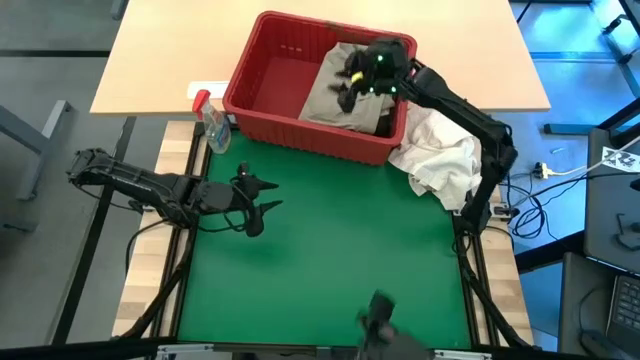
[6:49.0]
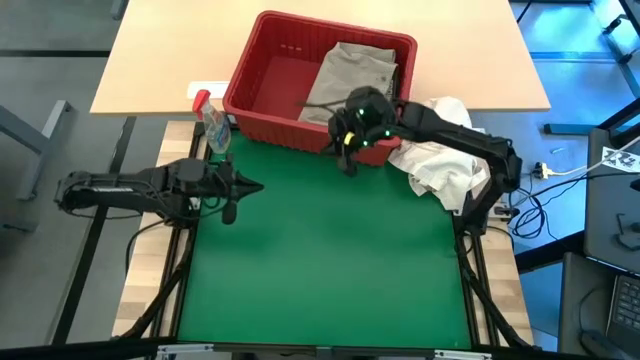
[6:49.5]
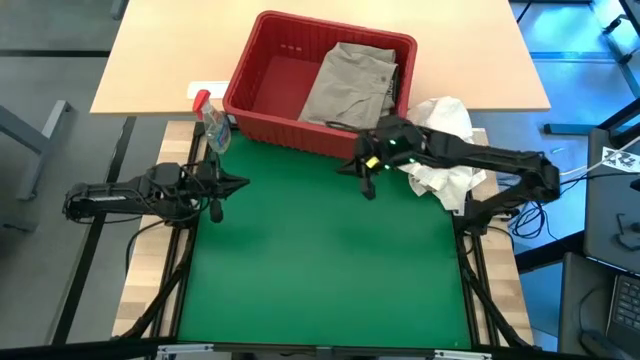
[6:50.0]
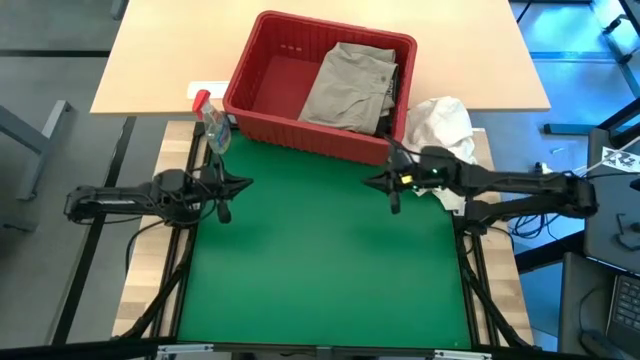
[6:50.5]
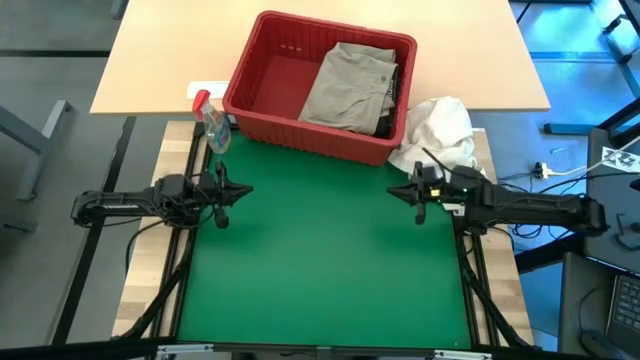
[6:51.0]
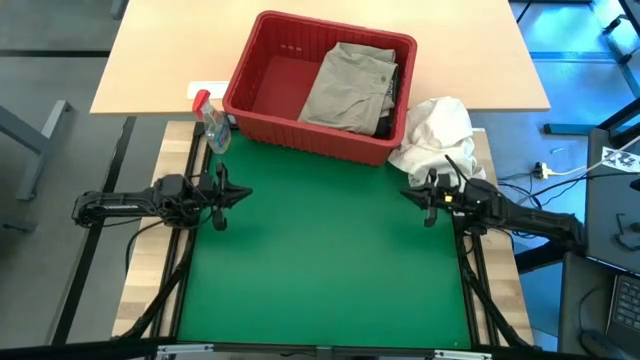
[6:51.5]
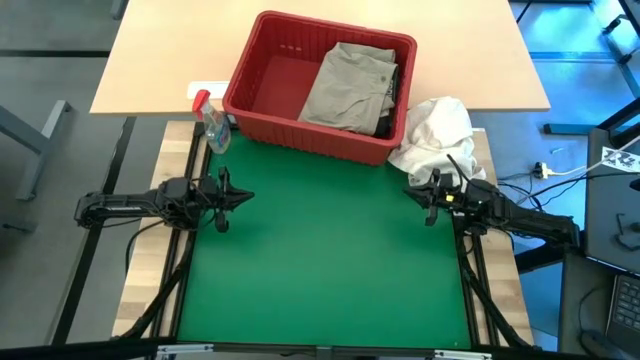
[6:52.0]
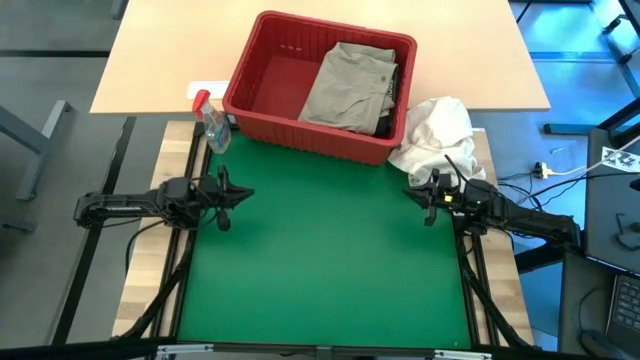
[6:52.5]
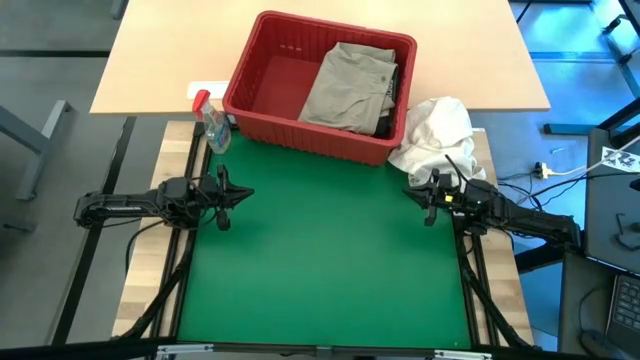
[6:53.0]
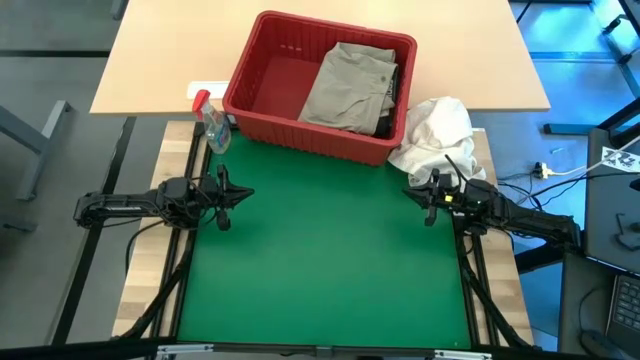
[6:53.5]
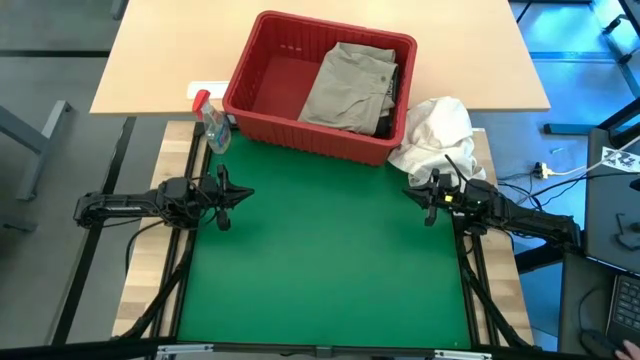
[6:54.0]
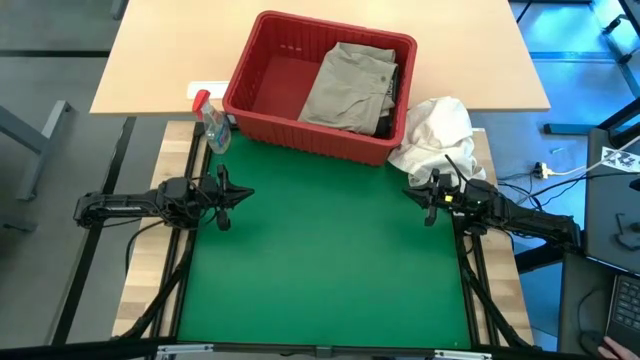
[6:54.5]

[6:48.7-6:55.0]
Task: Fold Laundry from Bin
Return to Home Position

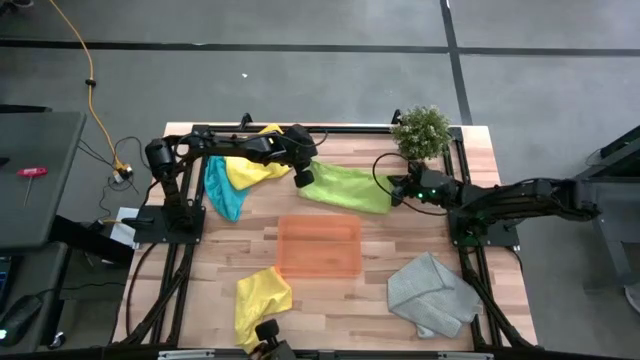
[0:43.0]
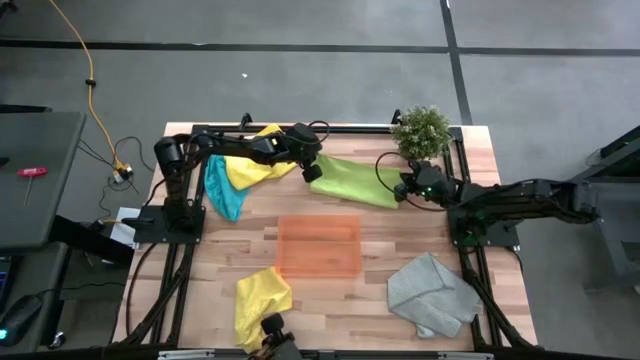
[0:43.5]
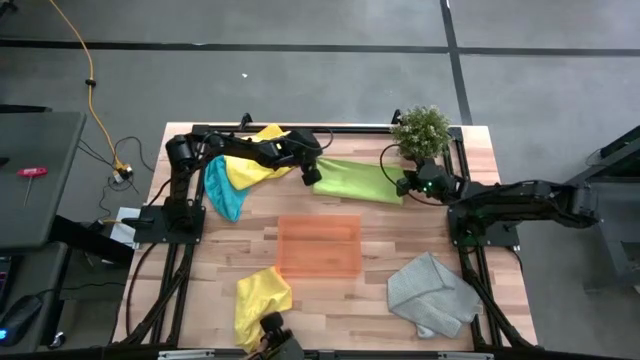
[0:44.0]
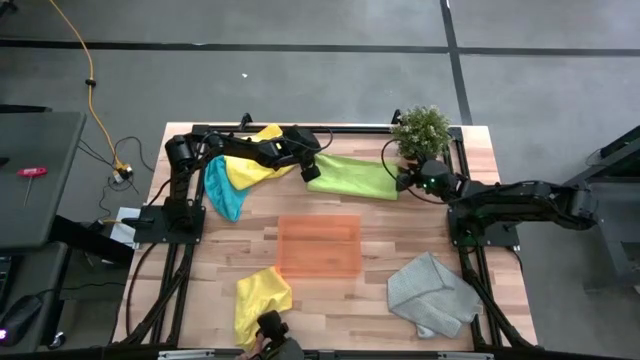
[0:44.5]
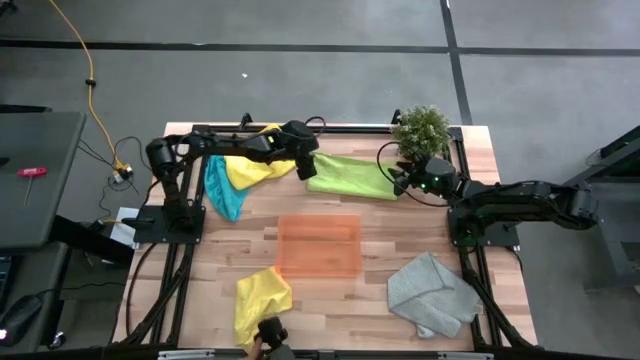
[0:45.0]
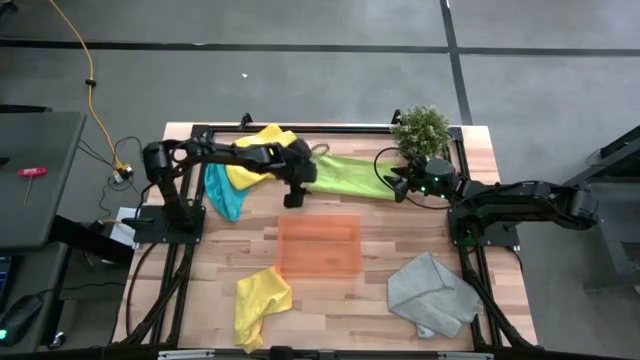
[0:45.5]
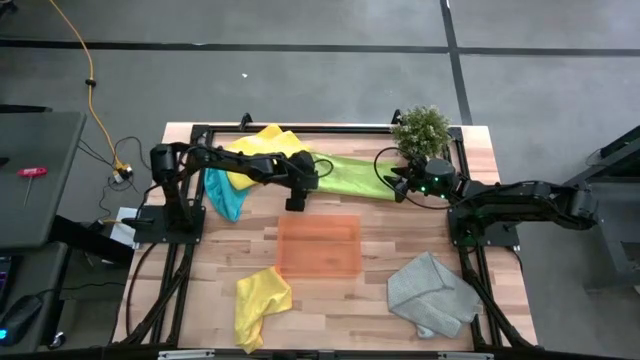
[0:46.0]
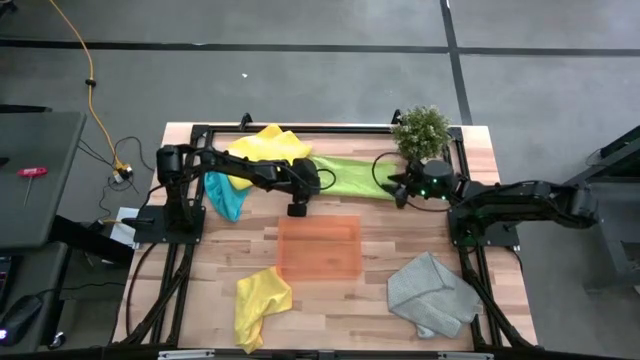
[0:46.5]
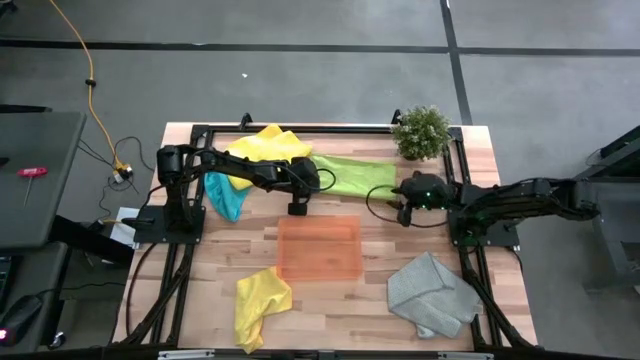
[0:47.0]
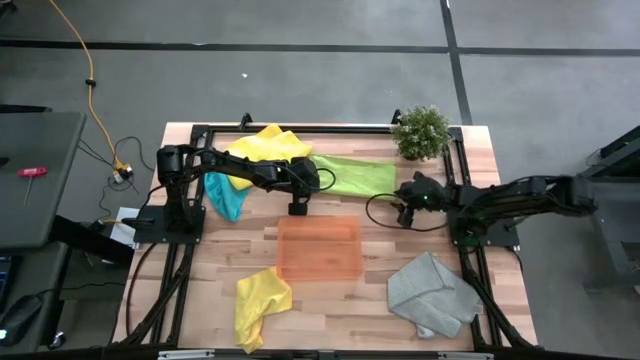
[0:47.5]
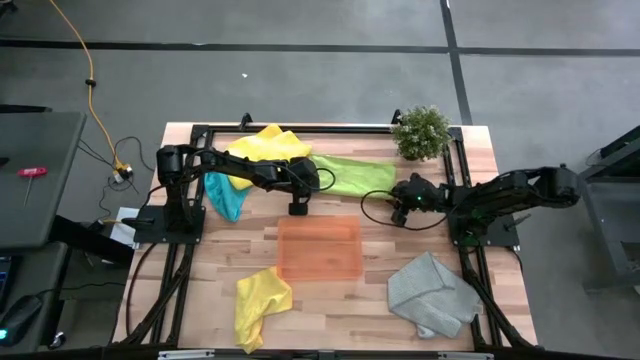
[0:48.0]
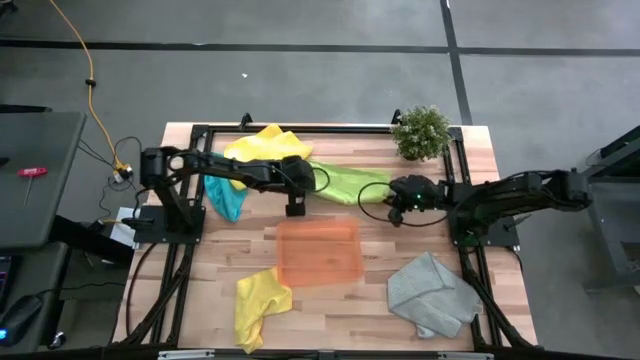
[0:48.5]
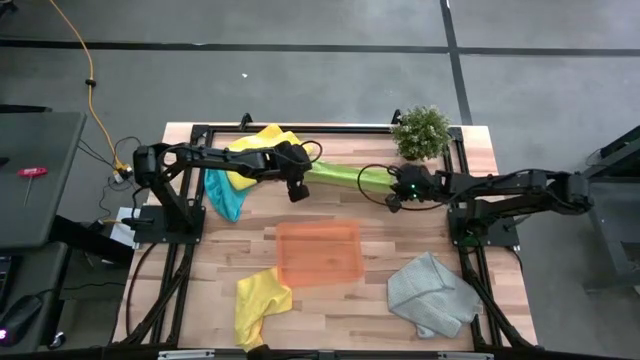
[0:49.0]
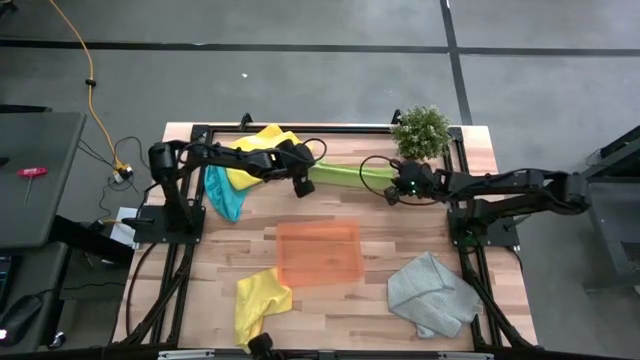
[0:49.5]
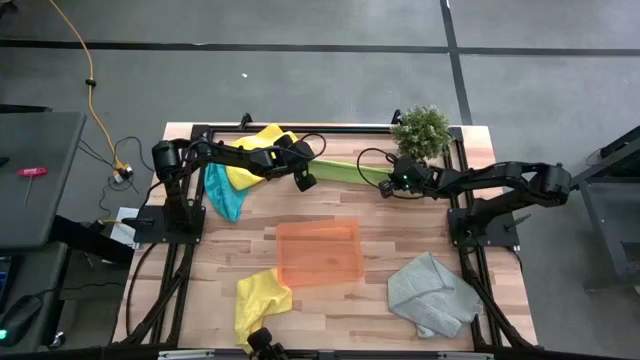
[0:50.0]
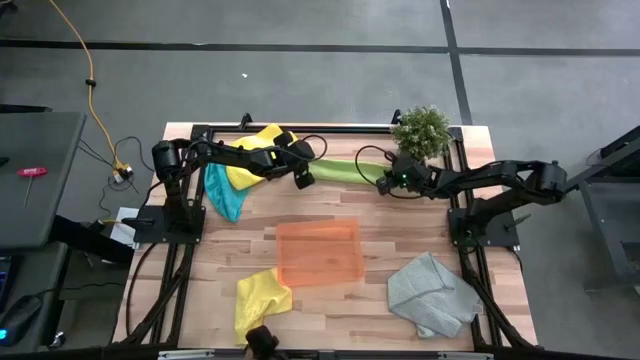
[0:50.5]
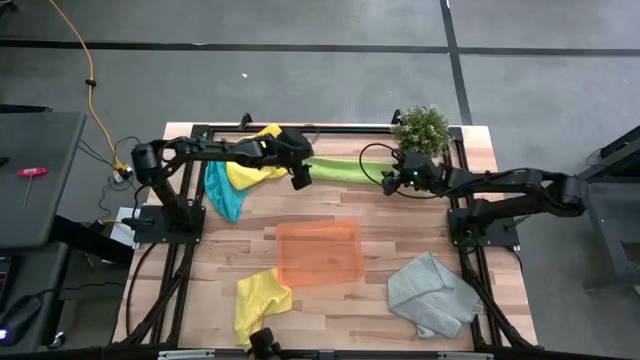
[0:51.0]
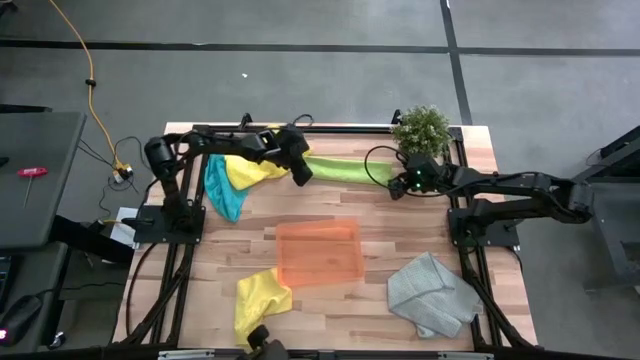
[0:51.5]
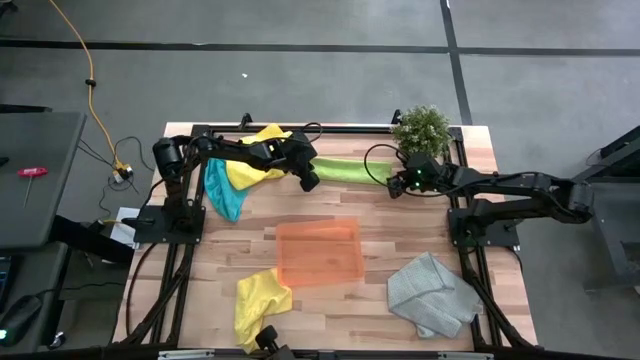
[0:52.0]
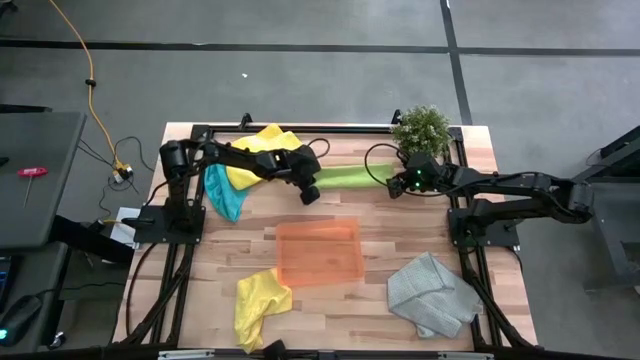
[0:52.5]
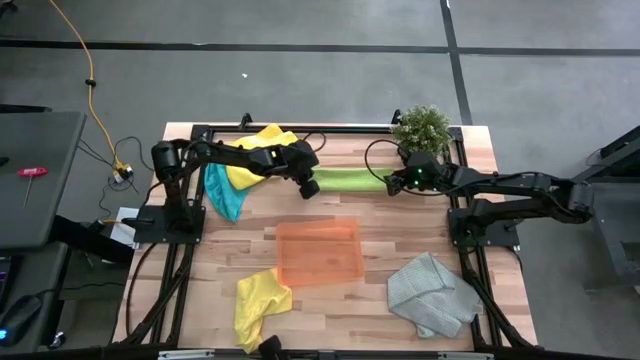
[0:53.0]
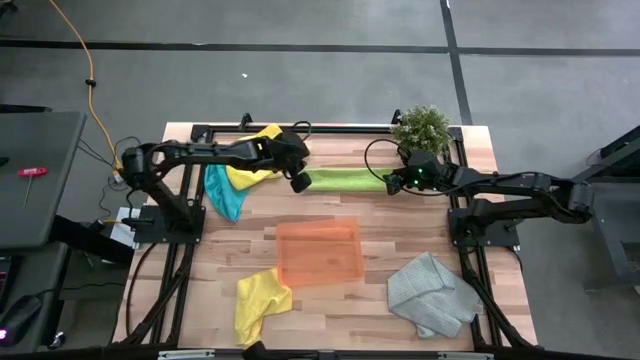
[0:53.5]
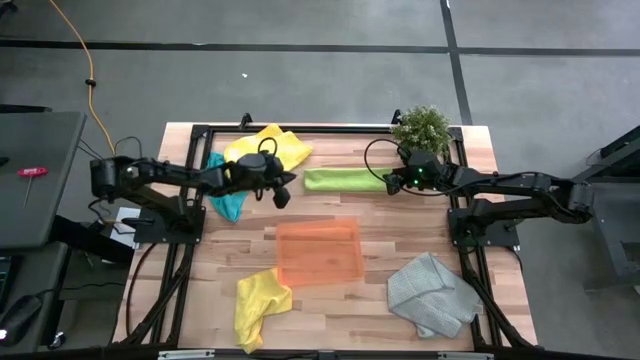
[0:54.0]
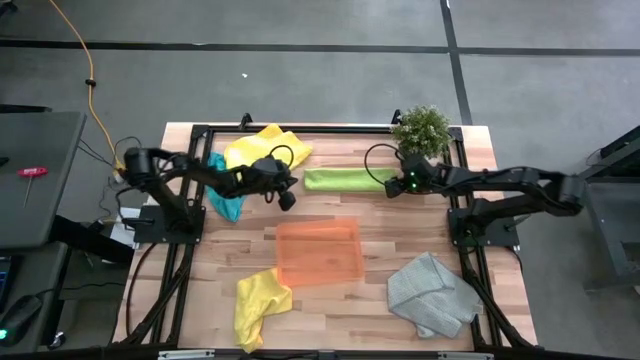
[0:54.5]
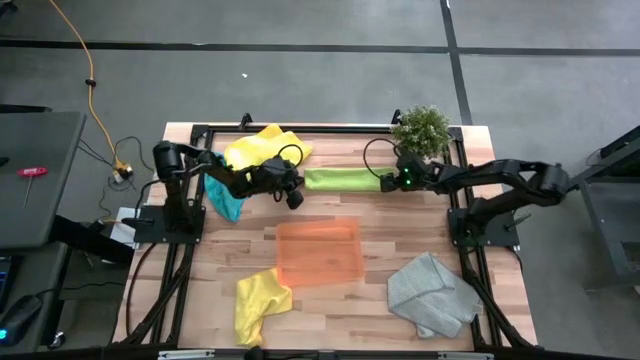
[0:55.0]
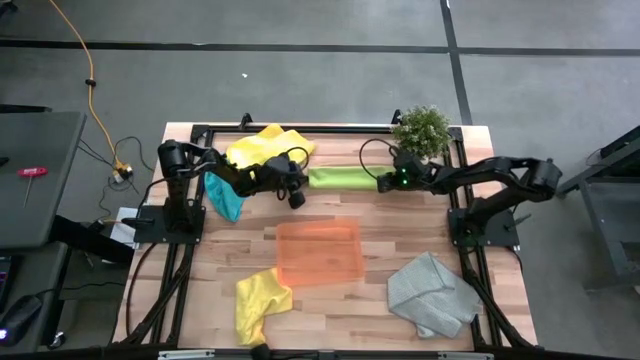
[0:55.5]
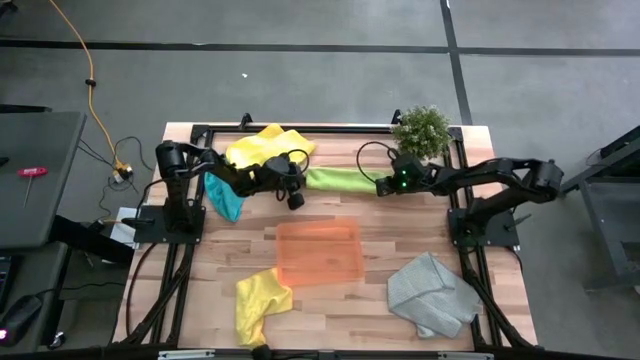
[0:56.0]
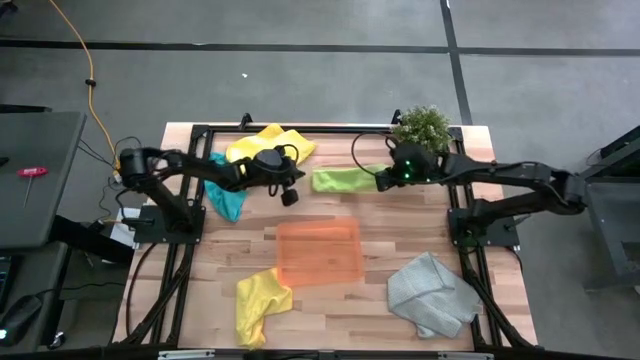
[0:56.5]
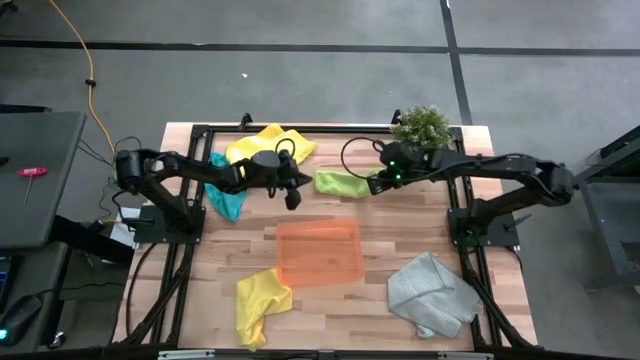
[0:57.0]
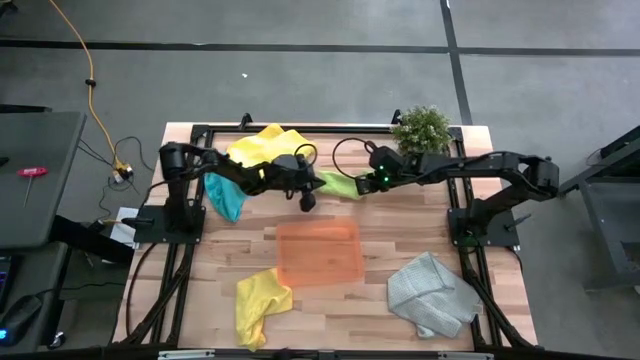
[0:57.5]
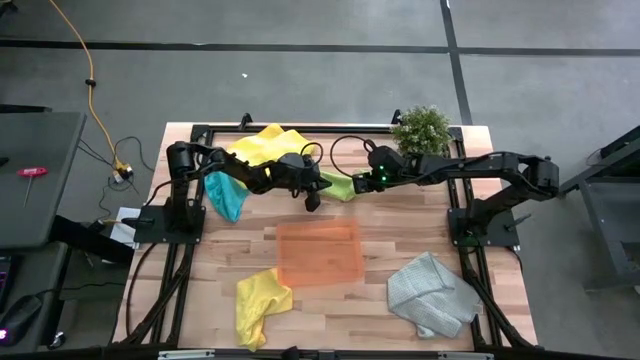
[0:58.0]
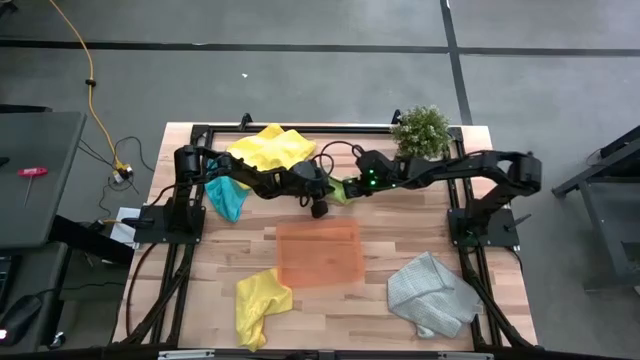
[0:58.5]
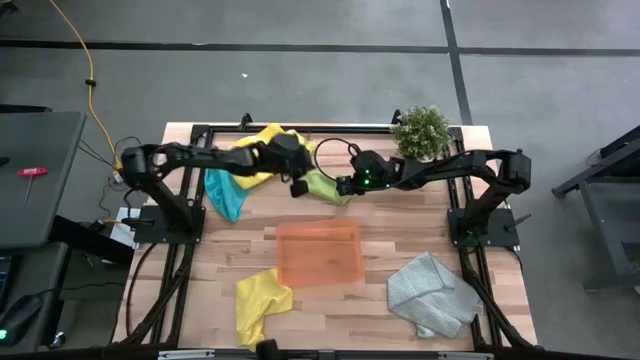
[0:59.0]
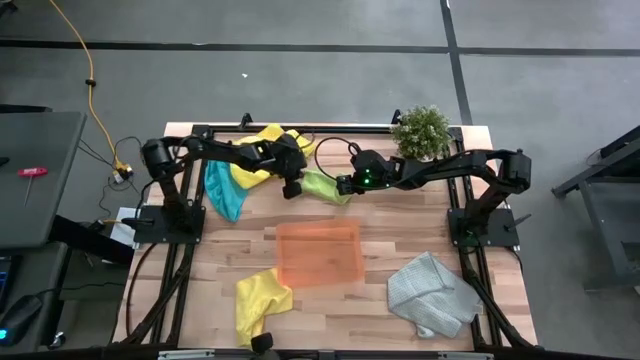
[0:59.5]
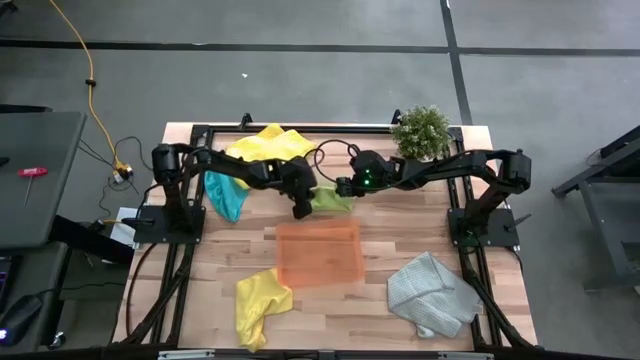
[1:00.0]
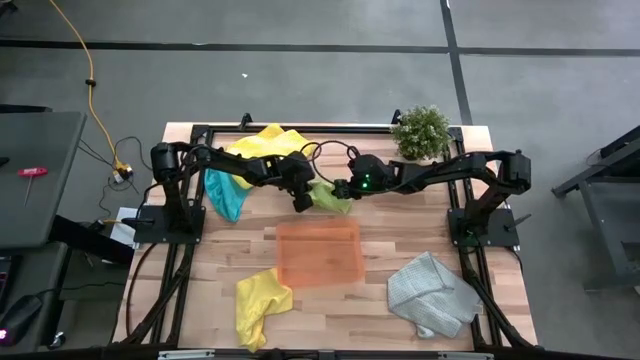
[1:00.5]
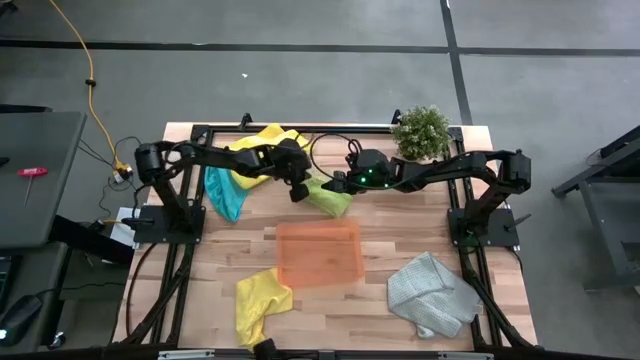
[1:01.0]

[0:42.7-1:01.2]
Task: Fold microfiber towels
Fold the green towel
